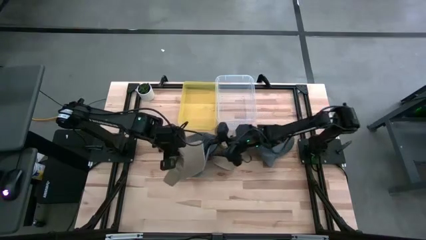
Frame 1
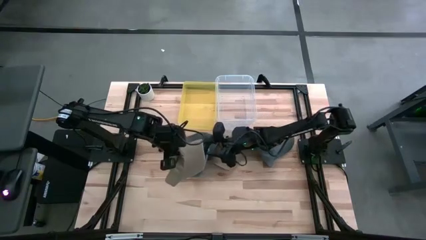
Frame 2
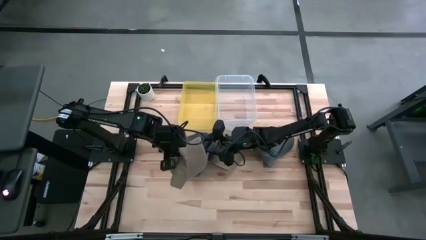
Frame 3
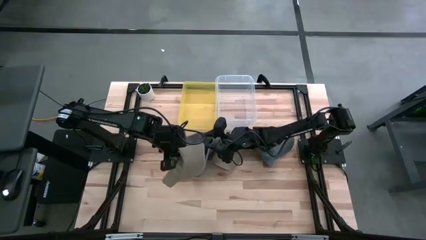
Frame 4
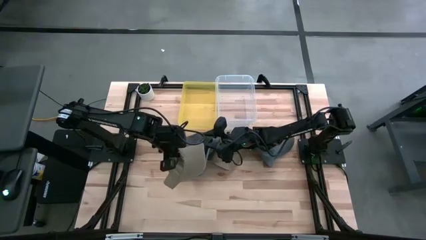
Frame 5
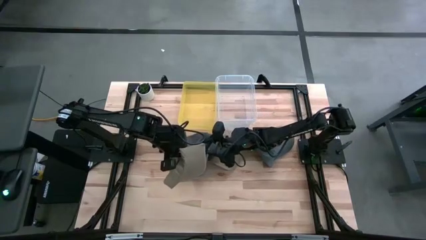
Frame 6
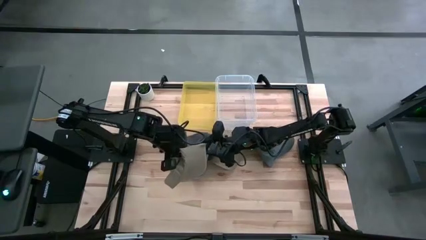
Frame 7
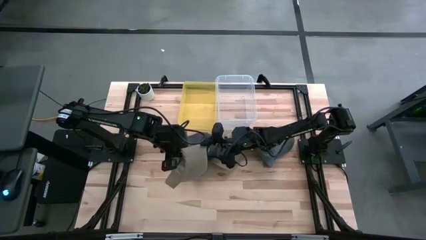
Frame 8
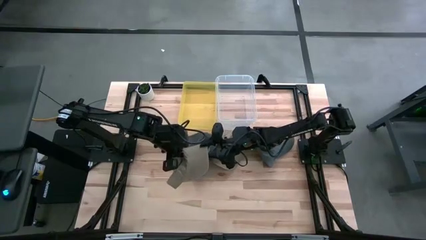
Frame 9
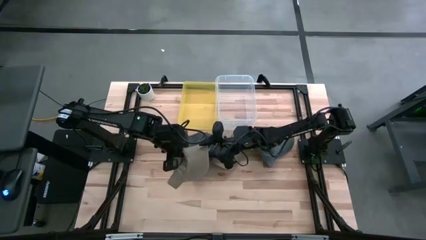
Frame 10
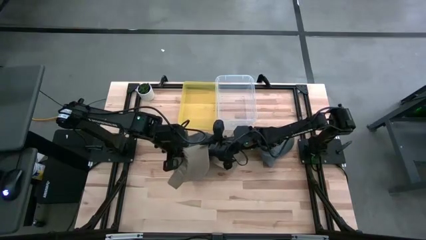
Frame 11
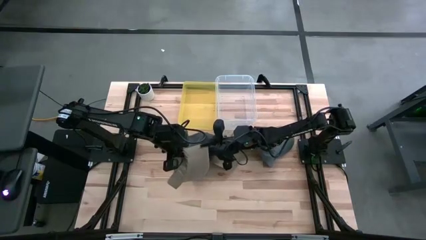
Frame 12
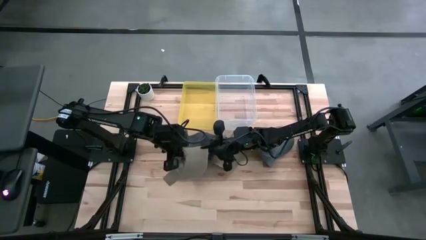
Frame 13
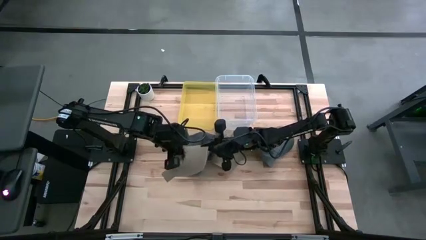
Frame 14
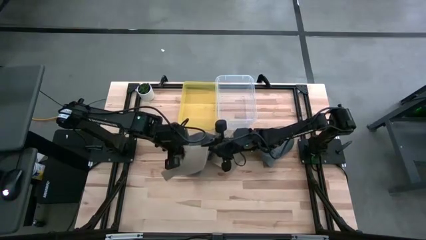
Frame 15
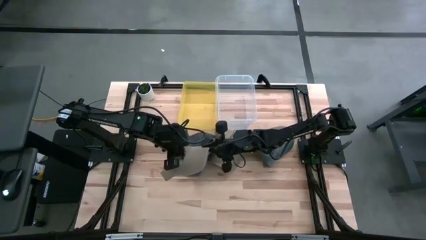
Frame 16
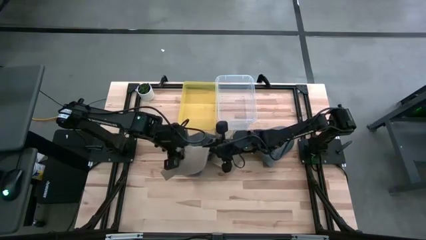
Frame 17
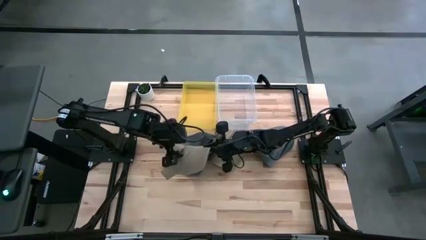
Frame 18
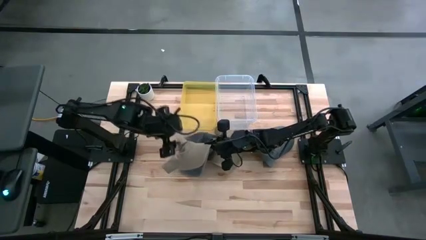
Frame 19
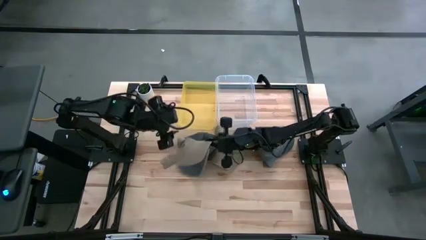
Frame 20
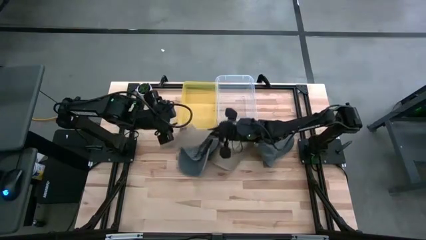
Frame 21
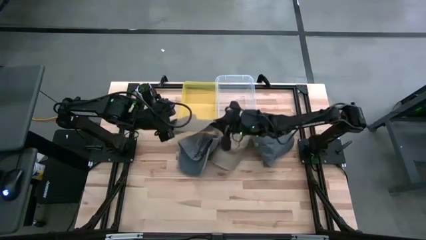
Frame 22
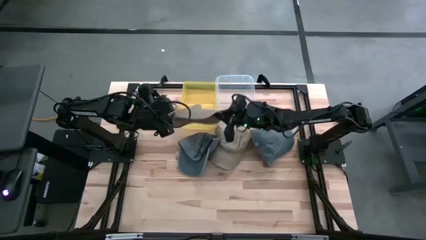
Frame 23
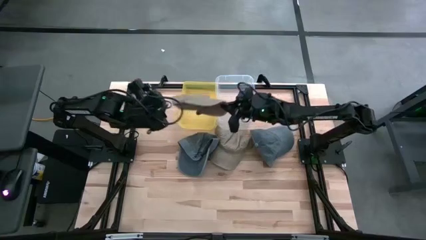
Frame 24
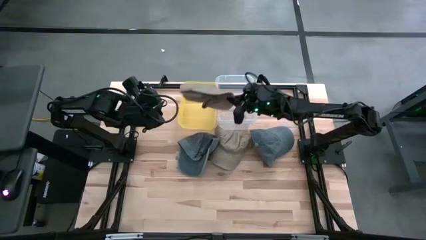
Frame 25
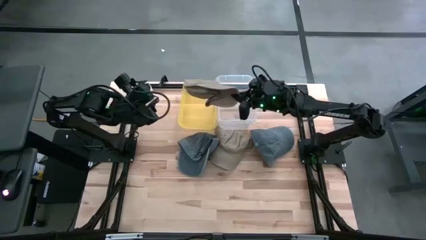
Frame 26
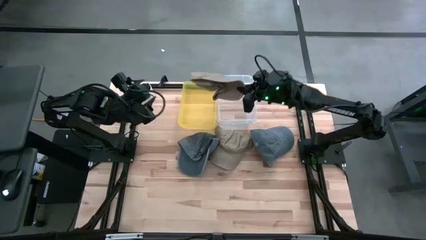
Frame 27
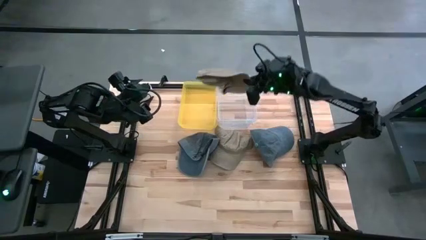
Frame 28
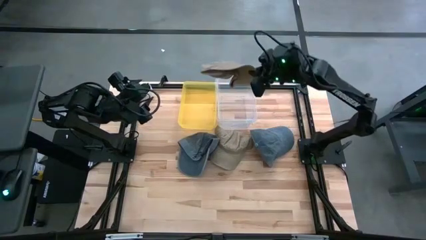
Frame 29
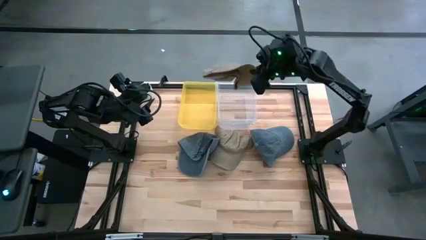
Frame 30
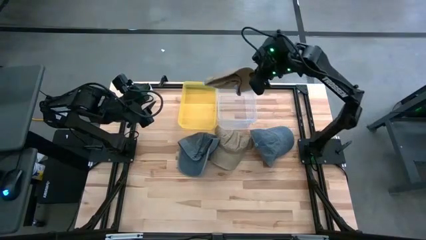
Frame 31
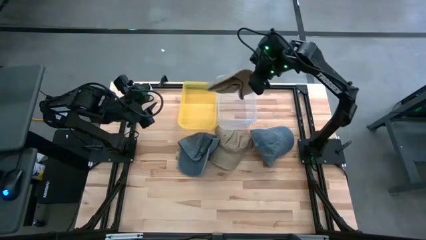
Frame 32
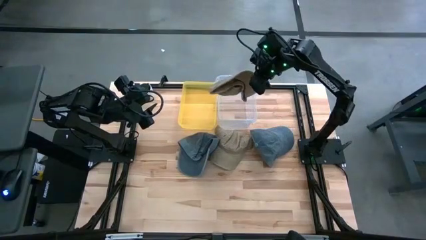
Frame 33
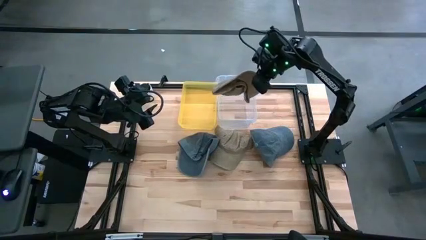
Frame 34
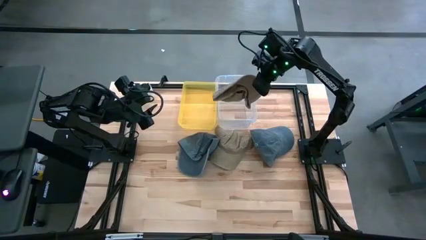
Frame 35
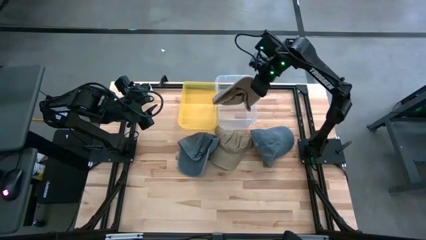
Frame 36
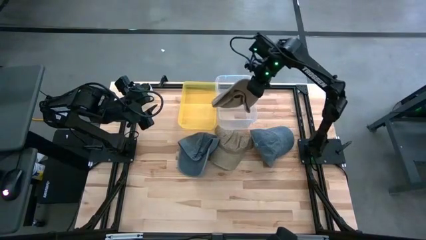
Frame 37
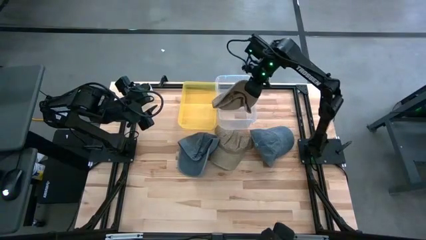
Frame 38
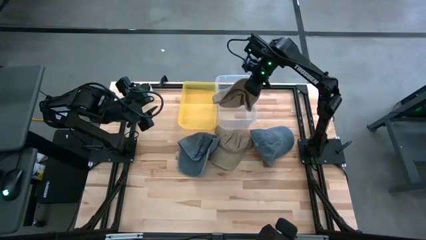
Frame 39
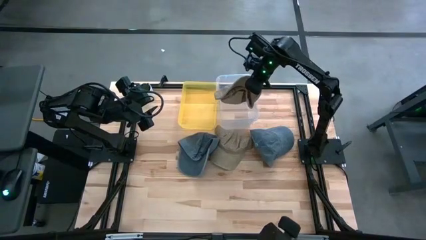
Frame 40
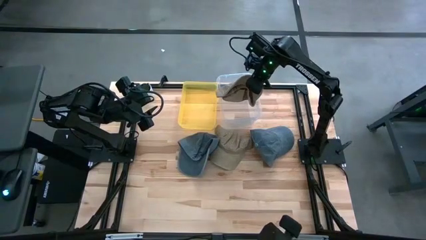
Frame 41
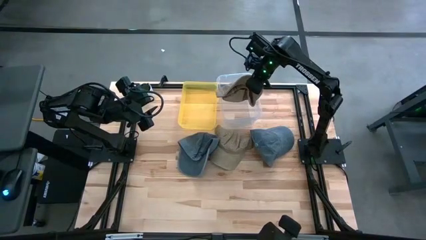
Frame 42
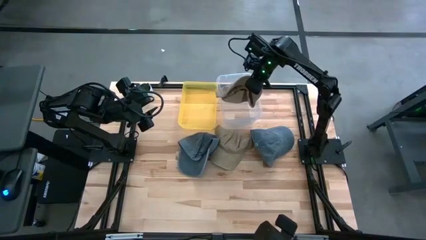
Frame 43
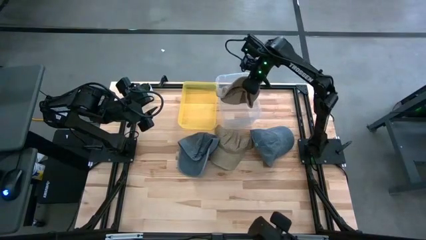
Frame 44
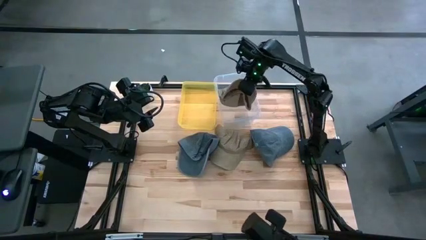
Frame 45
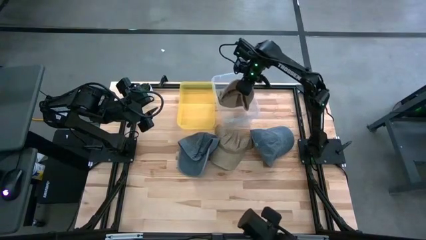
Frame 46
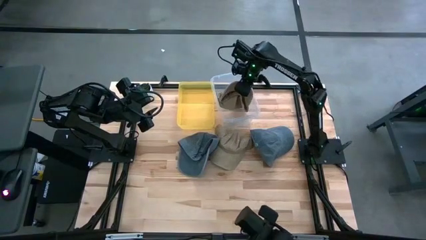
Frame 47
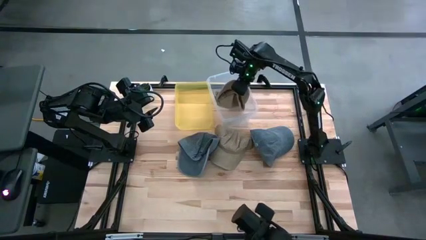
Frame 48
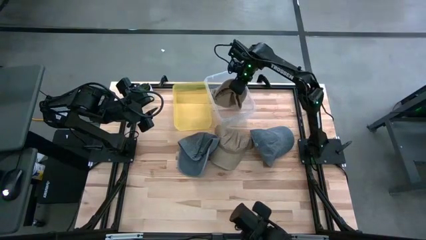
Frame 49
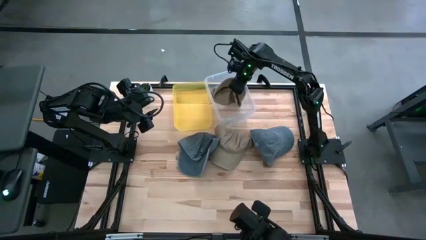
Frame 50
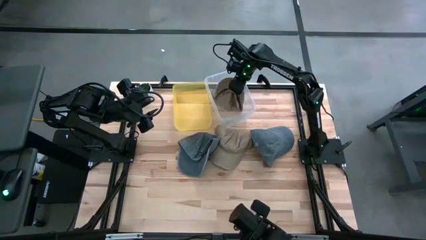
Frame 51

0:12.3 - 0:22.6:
Task: Pick & Place hat
Put the left brown cap into the transparent bin
